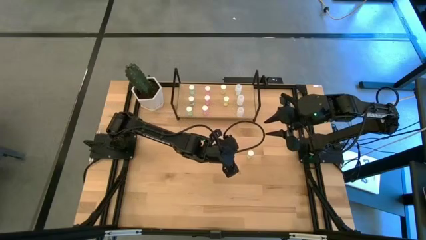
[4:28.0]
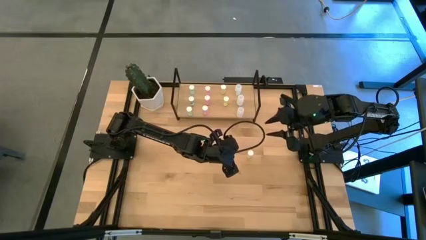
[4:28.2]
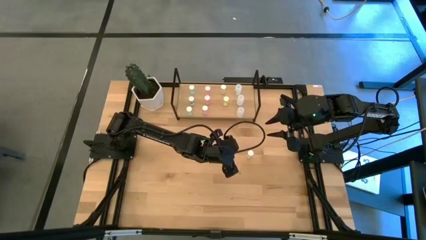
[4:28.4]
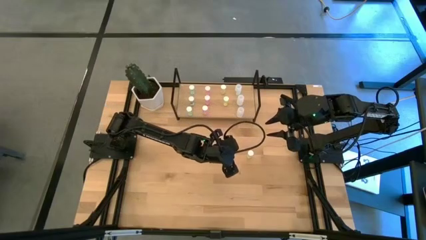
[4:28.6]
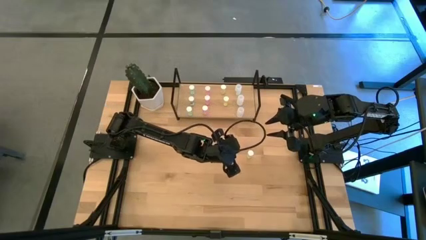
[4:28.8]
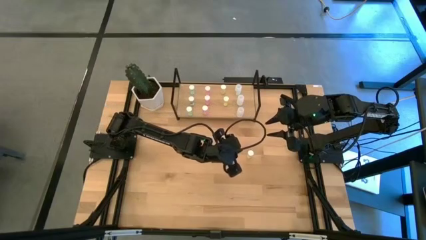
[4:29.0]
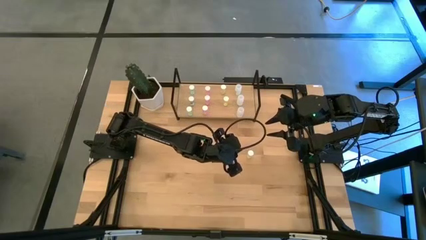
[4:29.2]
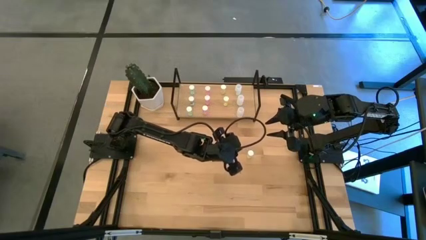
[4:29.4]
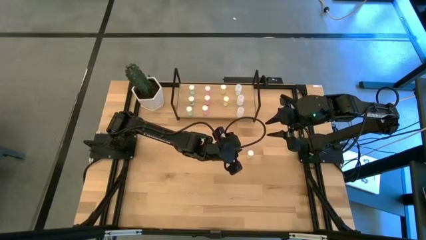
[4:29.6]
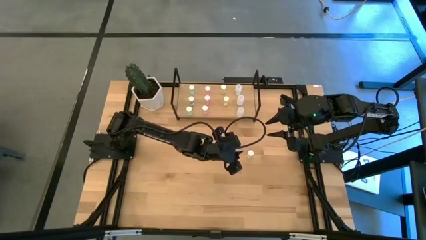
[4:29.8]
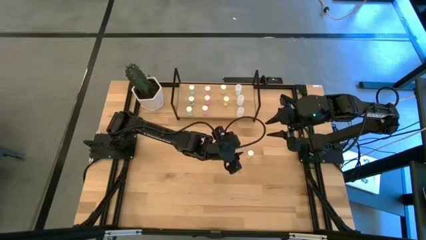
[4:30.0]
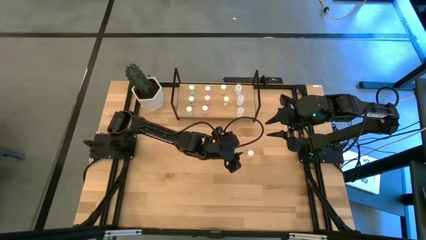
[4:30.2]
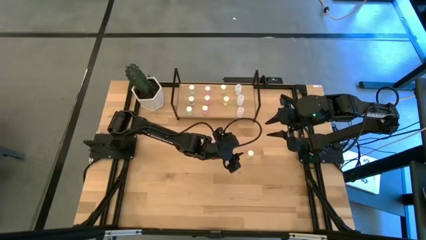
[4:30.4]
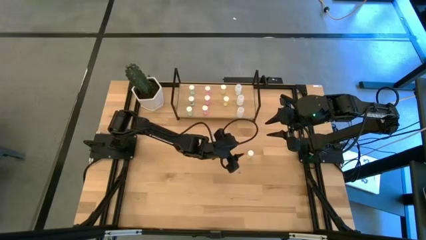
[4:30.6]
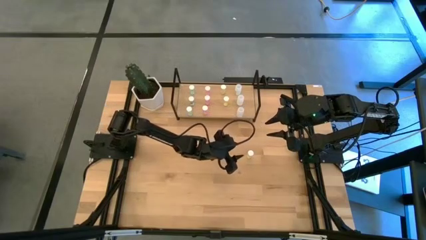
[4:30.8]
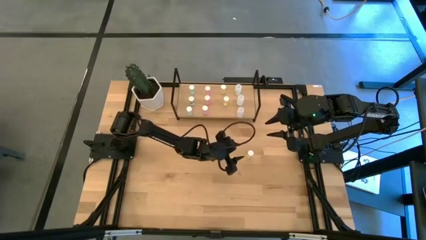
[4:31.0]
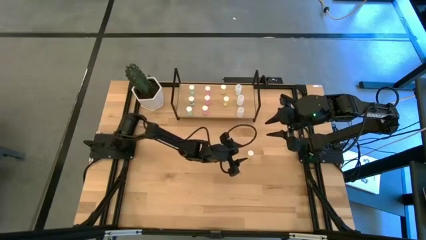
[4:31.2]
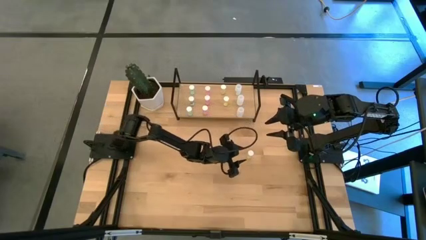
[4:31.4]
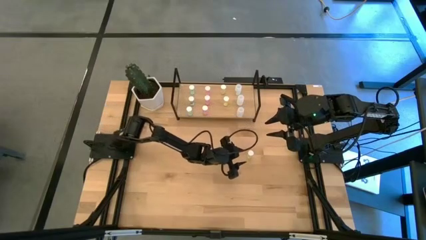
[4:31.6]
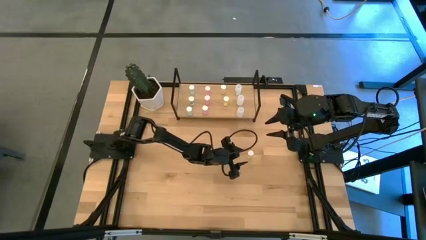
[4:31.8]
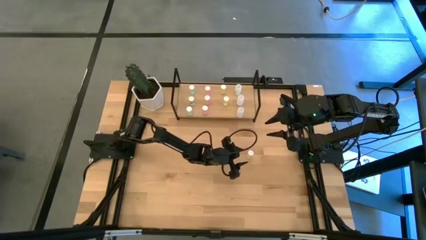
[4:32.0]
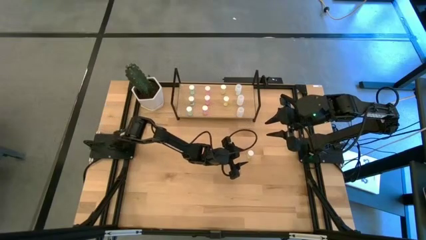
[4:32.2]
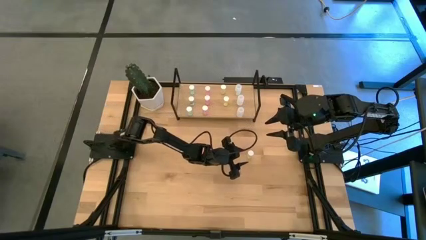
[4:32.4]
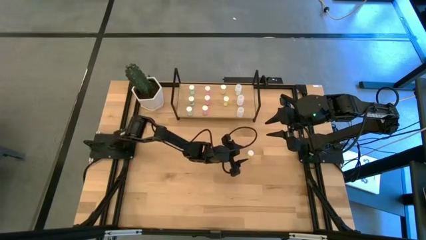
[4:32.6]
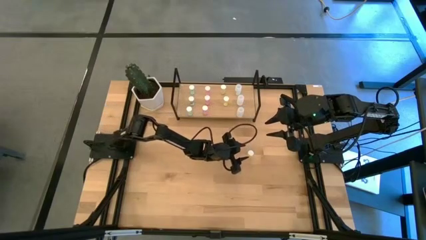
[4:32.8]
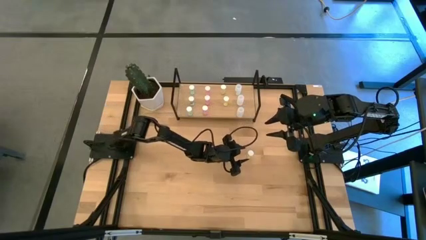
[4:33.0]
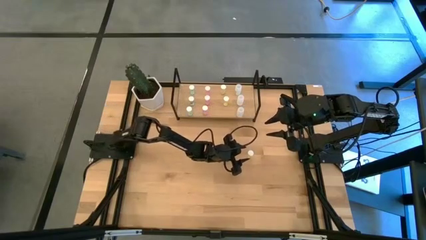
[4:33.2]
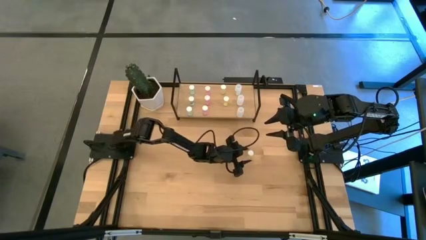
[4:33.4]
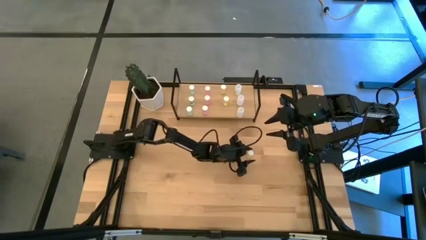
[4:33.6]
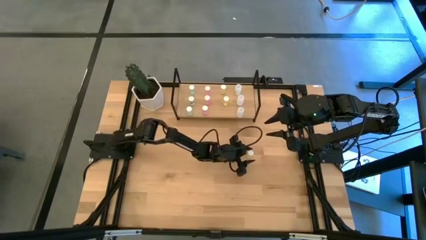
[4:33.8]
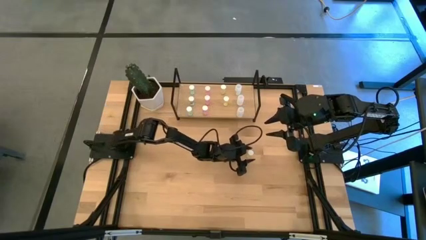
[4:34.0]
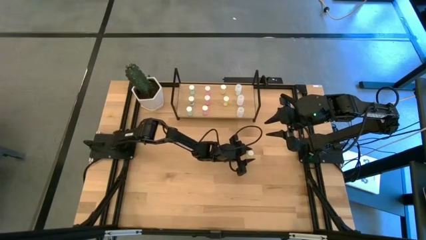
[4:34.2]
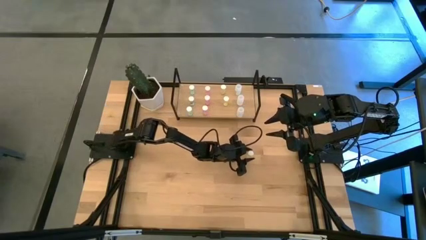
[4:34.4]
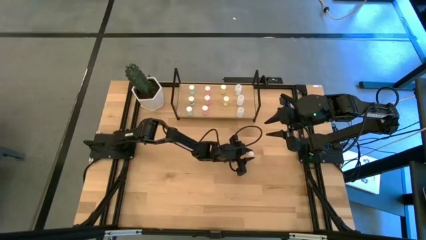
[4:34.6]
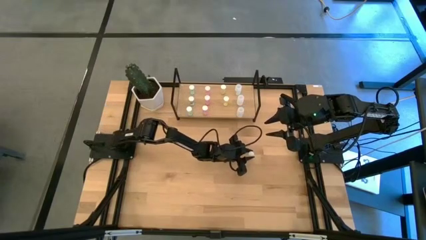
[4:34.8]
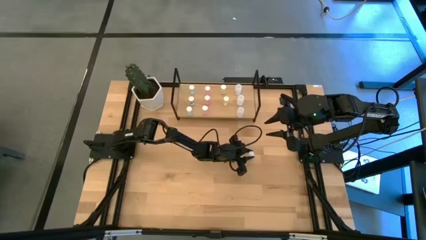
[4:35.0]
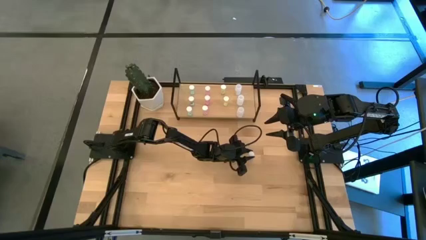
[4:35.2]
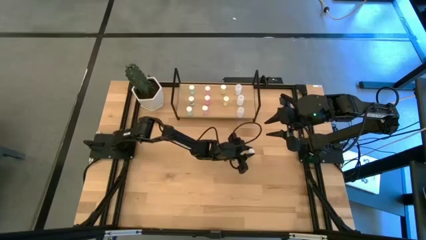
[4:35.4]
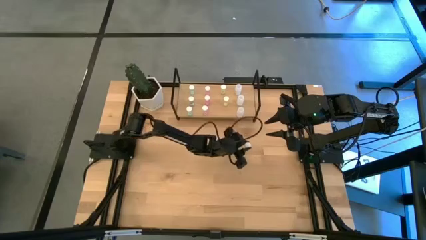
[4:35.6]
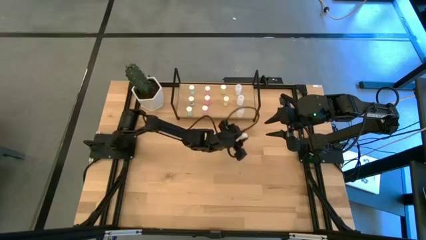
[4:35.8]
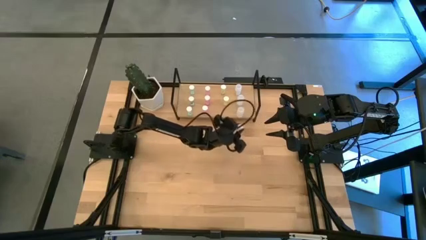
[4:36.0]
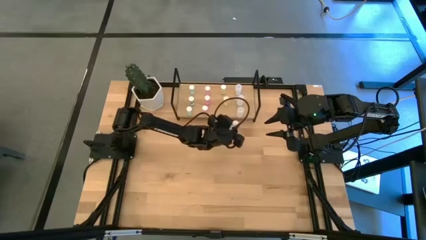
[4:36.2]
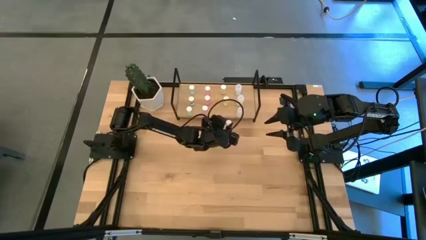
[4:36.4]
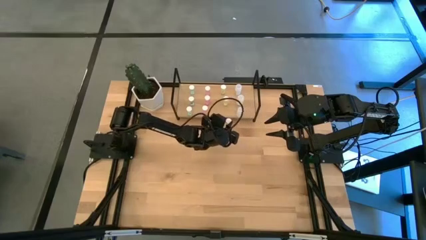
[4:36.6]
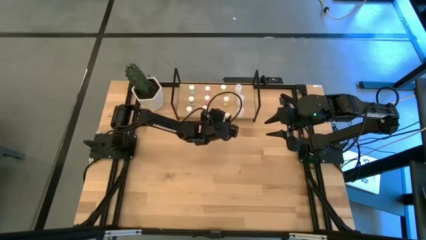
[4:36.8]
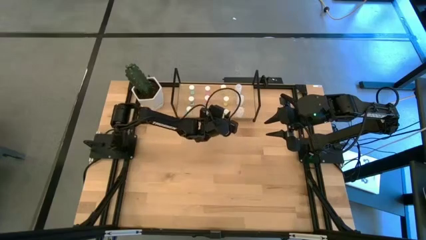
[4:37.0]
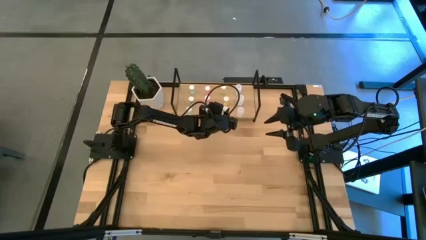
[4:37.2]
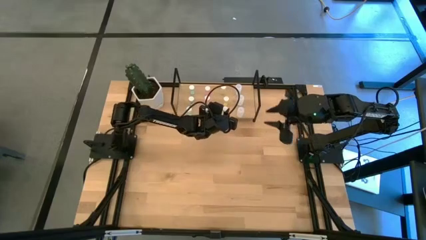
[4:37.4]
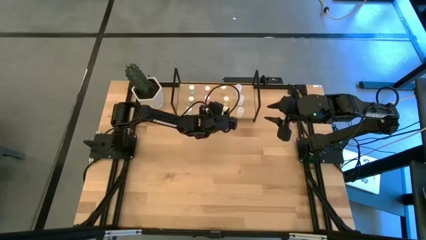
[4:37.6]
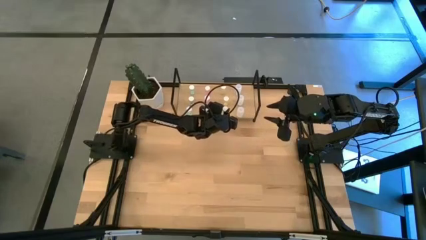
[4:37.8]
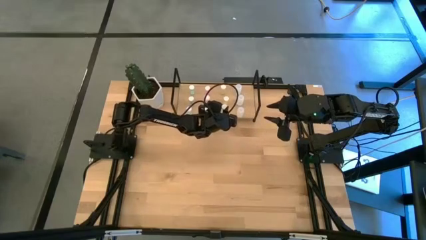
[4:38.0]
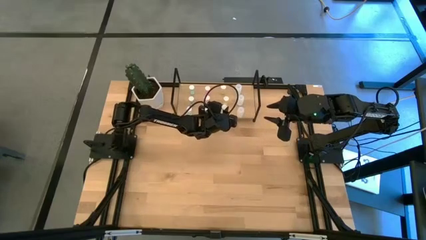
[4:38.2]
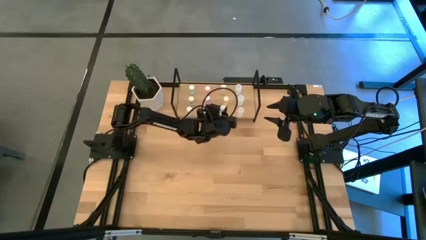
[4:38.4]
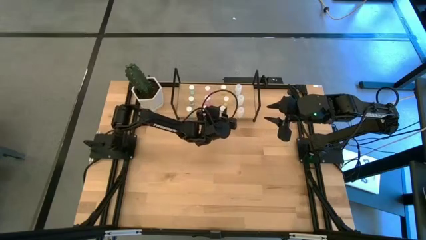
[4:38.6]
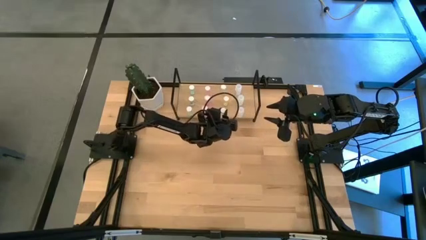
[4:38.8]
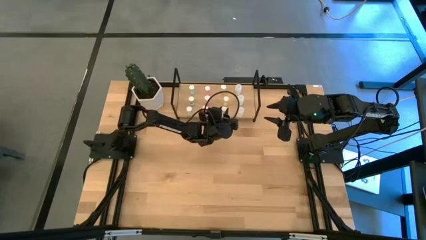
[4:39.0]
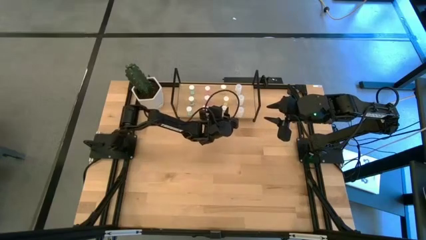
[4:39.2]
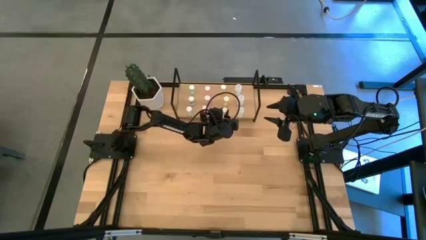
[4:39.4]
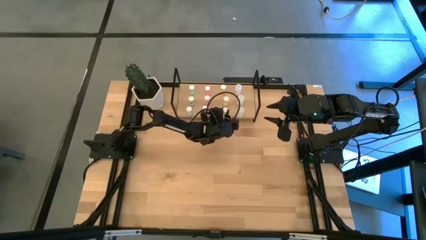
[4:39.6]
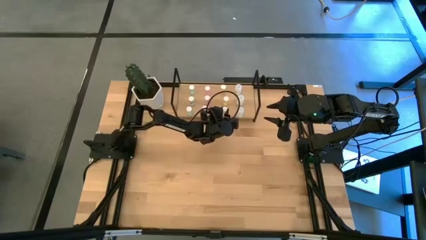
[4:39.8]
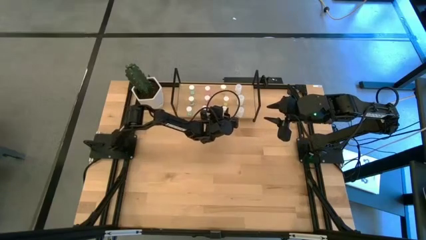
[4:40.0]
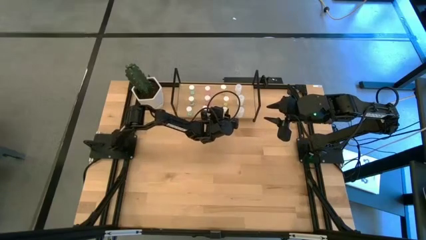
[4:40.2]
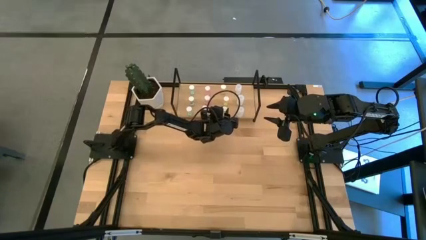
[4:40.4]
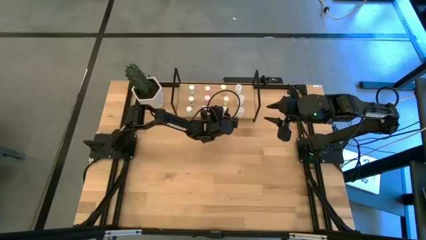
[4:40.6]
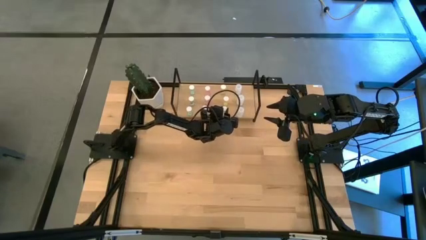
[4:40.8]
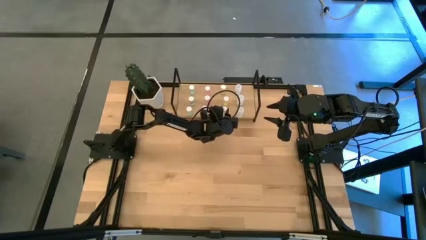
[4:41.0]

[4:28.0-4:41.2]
Task: Pick and place medicine bottles onto shelf by color
Put the yellow pill bottle on the shelf aligned with the other yellow pill bottle

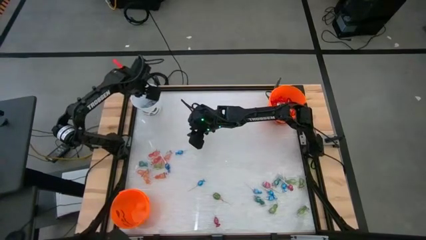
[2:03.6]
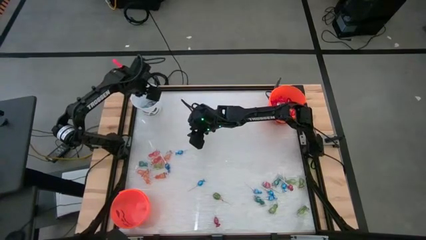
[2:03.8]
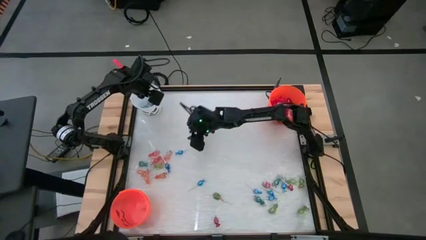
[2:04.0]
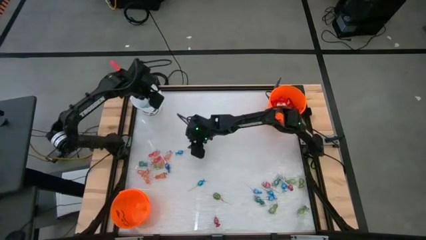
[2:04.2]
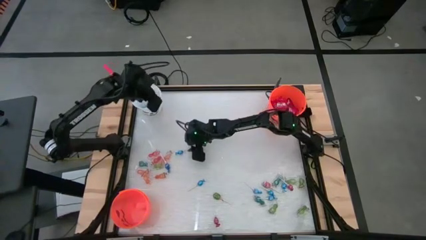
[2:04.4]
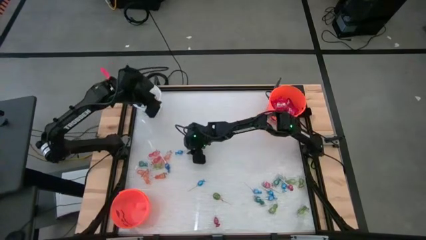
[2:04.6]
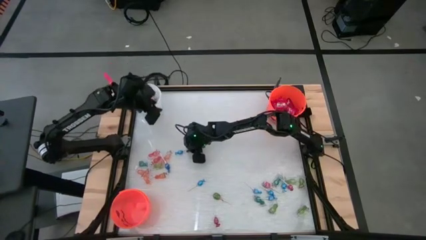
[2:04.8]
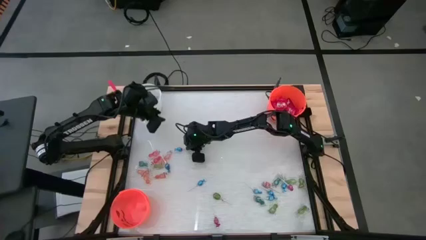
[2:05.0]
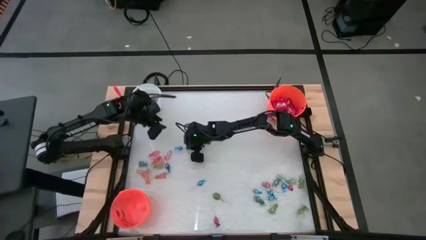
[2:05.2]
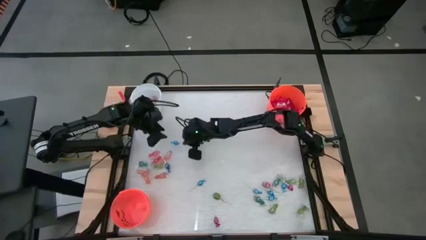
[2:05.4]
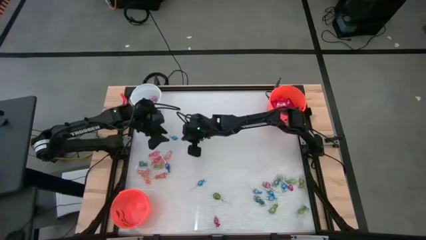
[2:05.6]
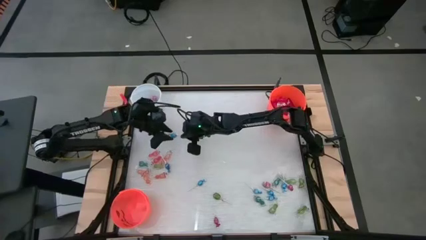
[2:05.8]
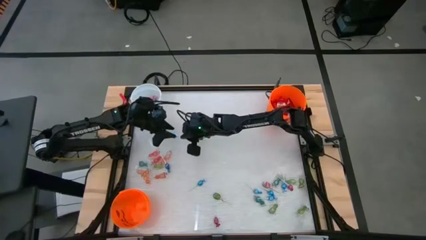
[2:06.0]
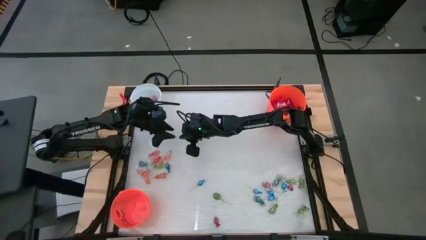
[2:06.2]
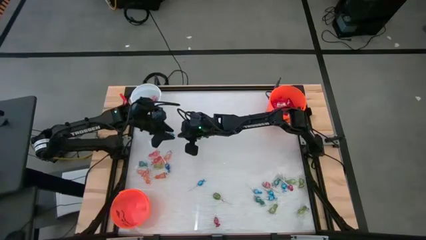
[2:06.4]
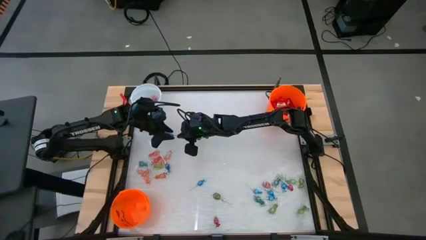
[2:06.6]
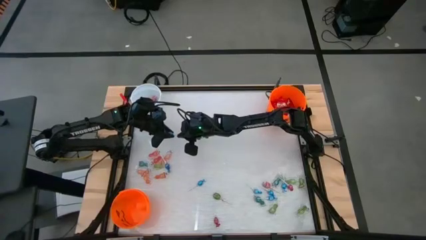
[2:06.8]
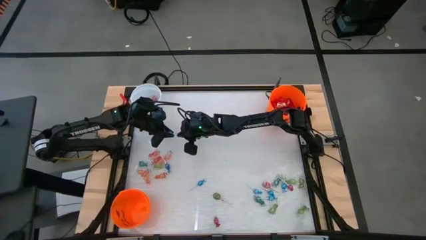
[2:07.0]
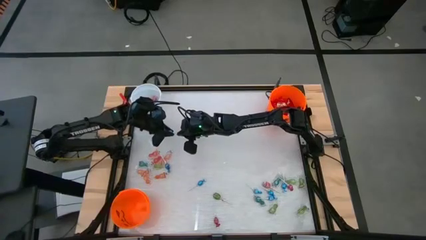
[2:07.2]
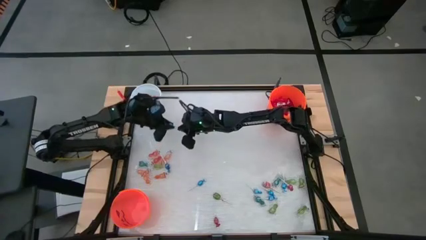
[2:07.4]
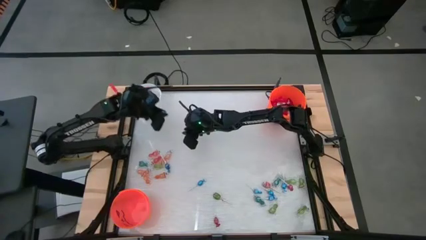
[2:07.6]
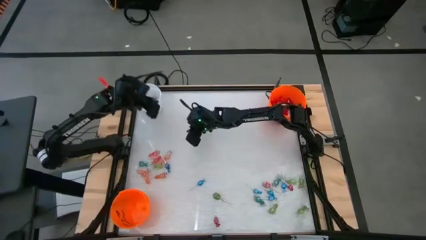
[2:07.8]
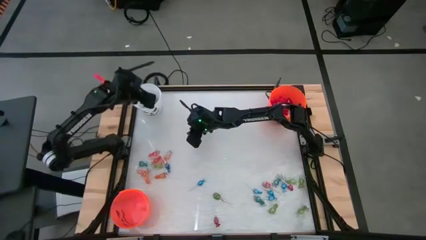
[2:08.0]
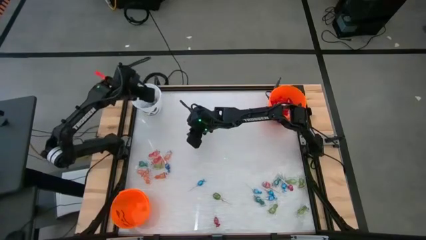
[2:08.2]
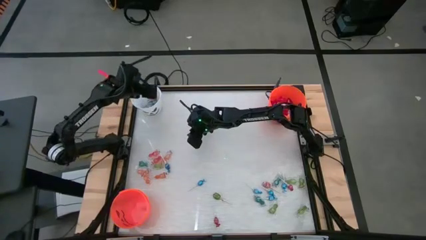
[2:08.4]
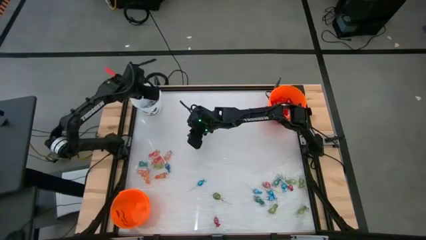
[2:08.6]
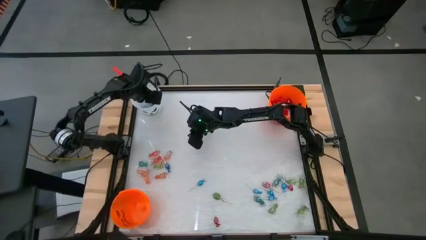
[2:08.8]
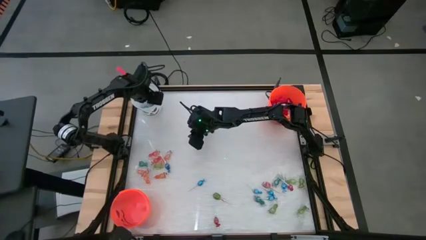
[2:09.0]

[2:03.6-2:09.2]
Task: Sort candy by brand, put in halloween buckets
Put the blue lollipop into the white bucket
